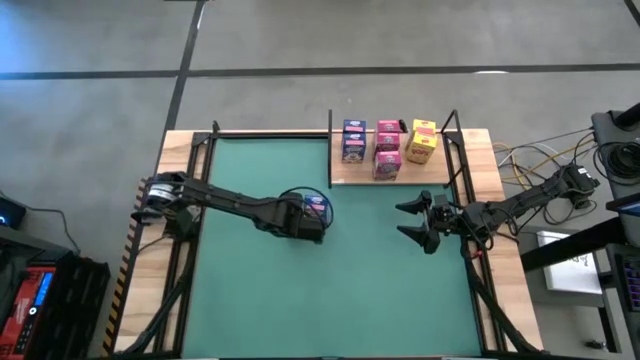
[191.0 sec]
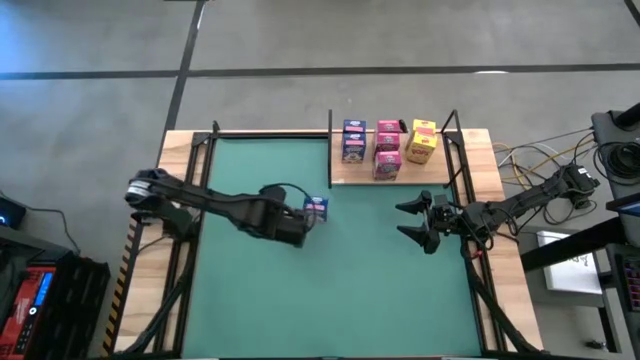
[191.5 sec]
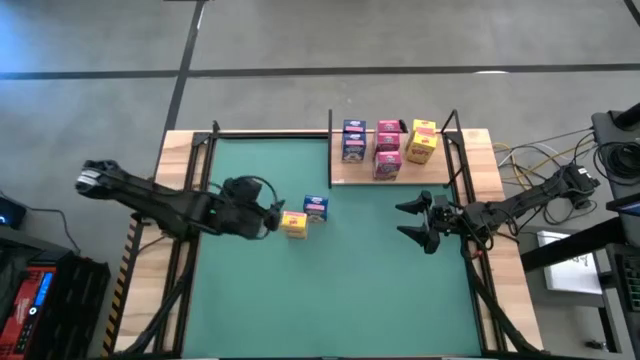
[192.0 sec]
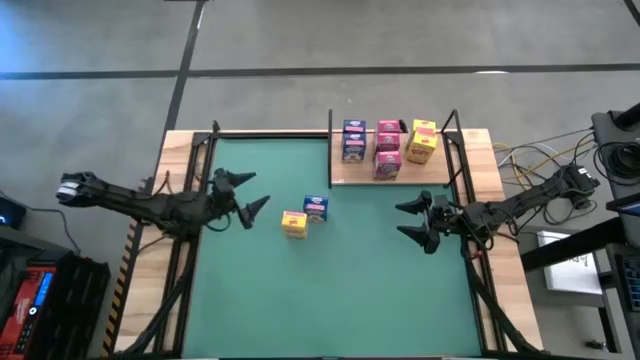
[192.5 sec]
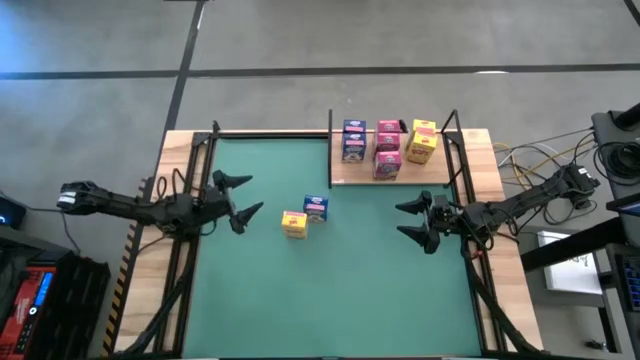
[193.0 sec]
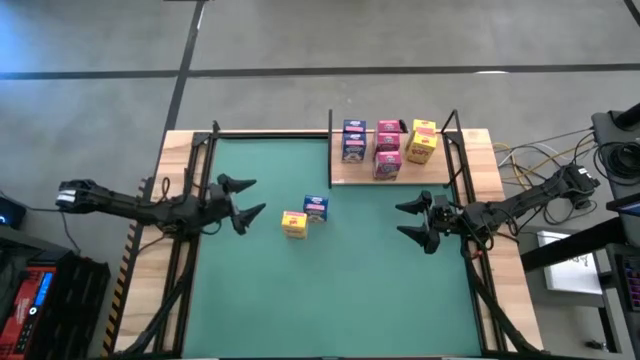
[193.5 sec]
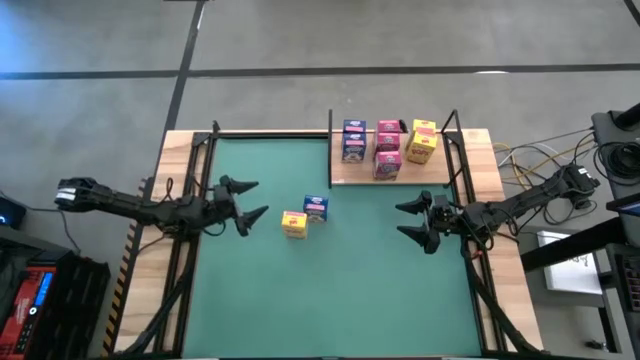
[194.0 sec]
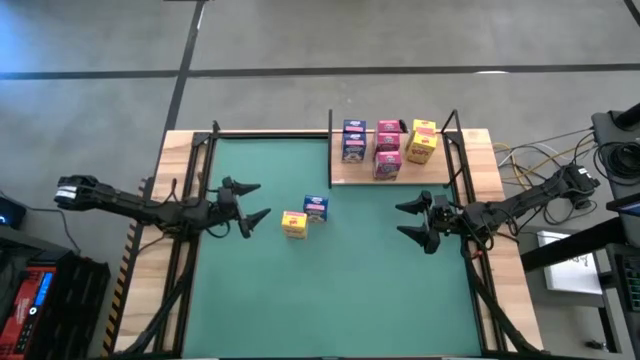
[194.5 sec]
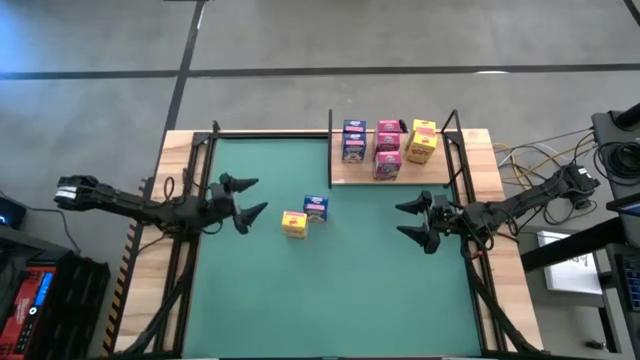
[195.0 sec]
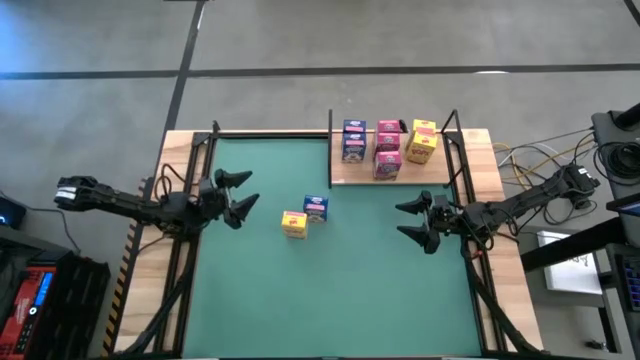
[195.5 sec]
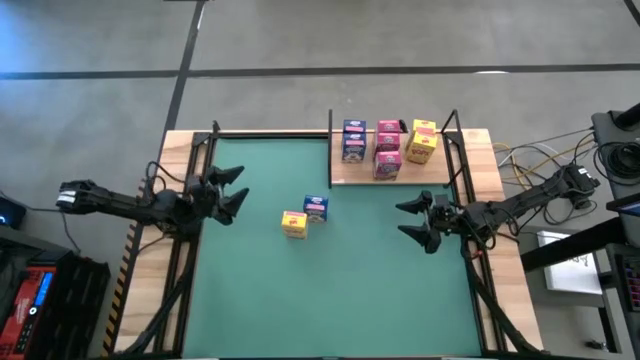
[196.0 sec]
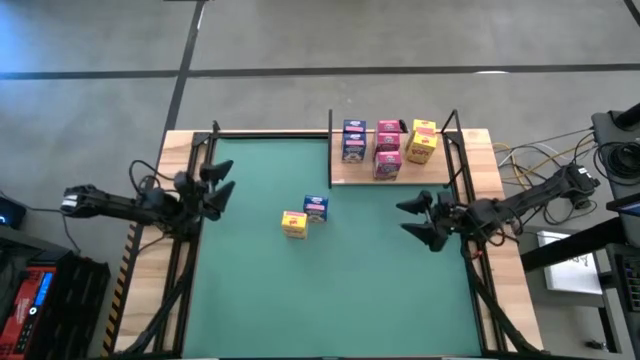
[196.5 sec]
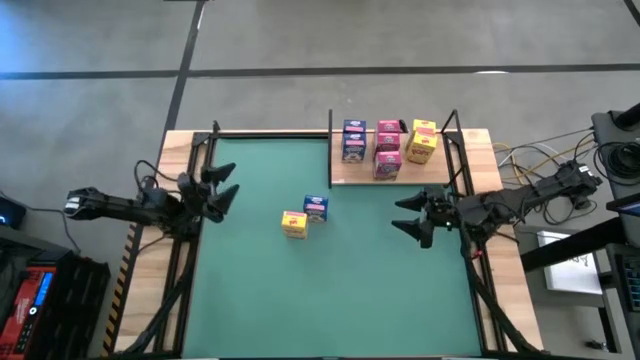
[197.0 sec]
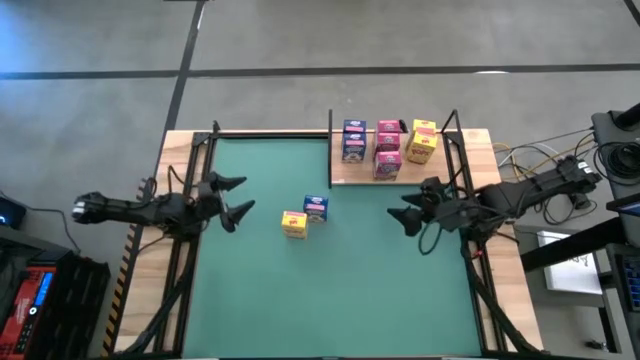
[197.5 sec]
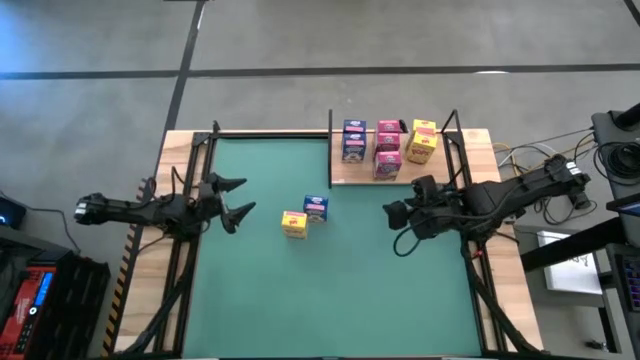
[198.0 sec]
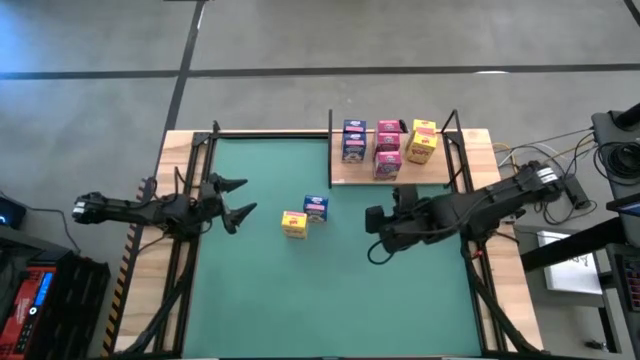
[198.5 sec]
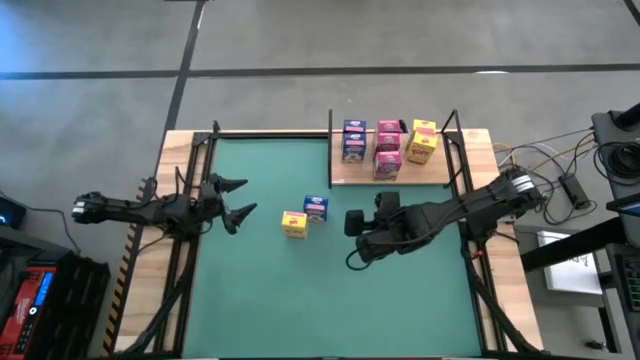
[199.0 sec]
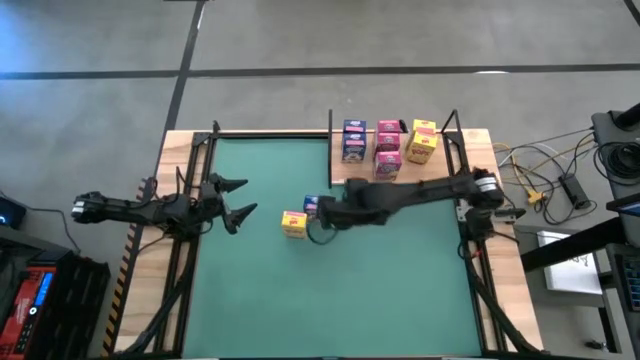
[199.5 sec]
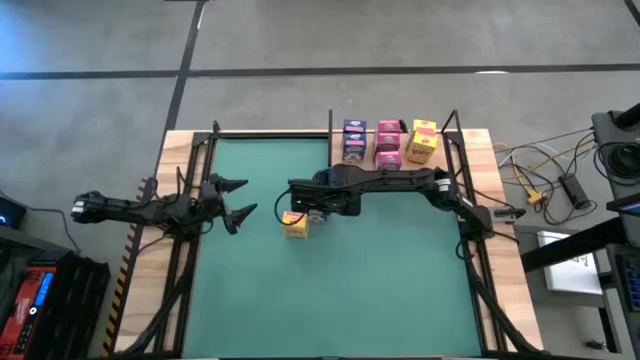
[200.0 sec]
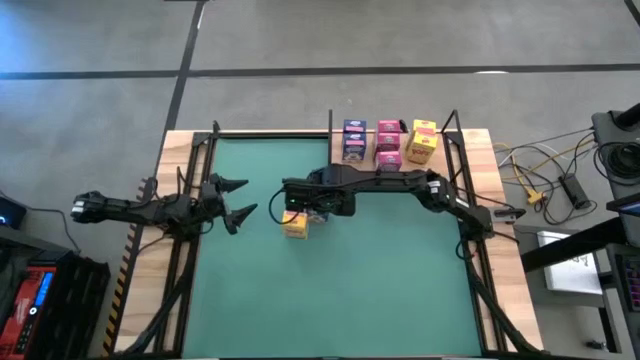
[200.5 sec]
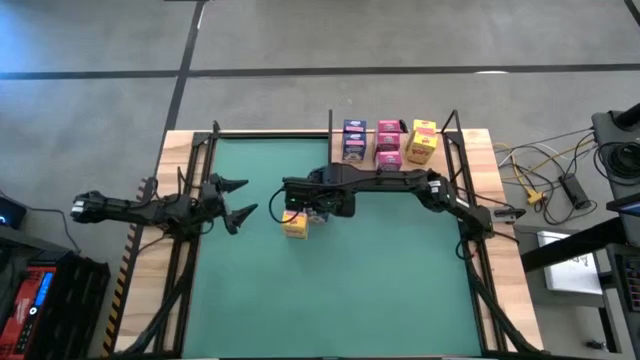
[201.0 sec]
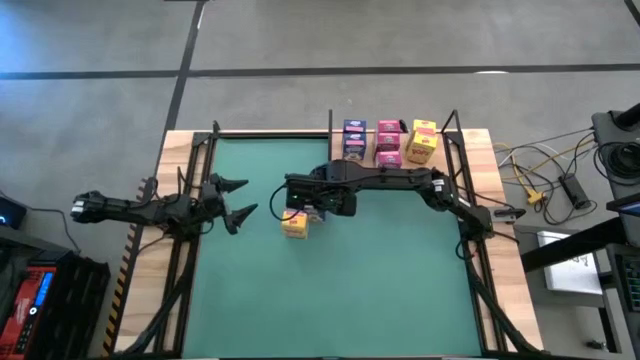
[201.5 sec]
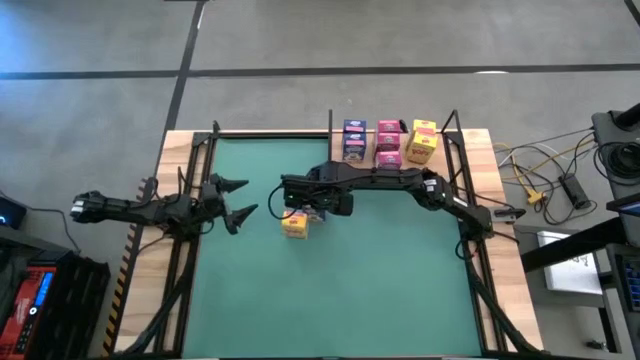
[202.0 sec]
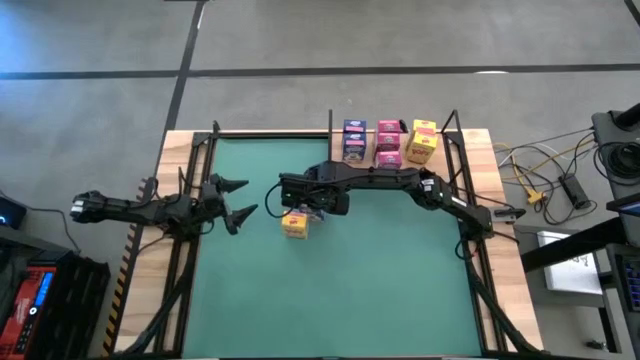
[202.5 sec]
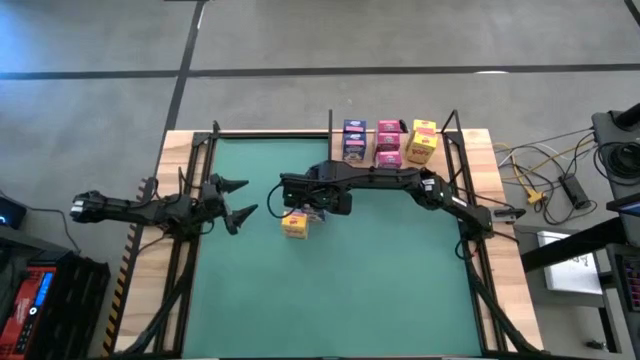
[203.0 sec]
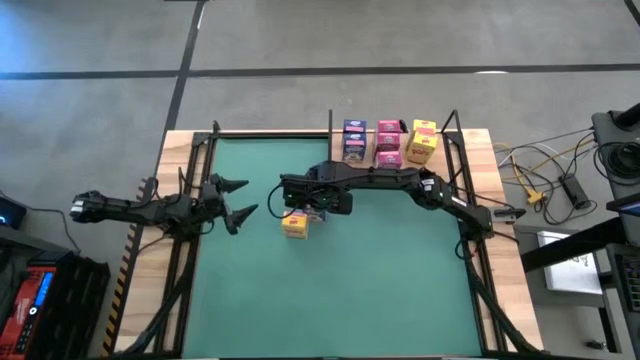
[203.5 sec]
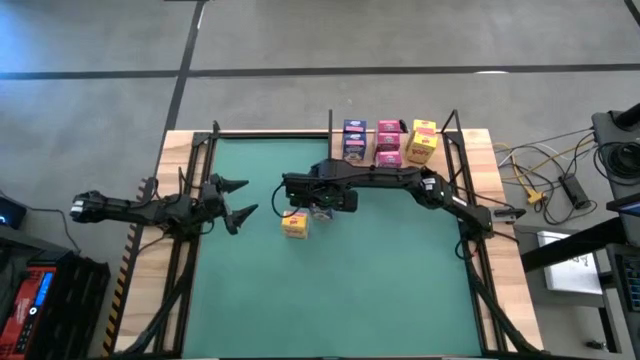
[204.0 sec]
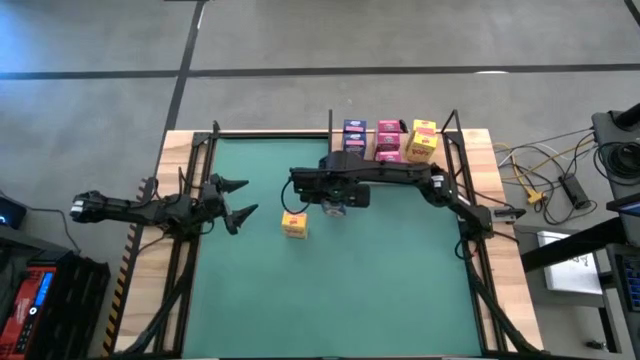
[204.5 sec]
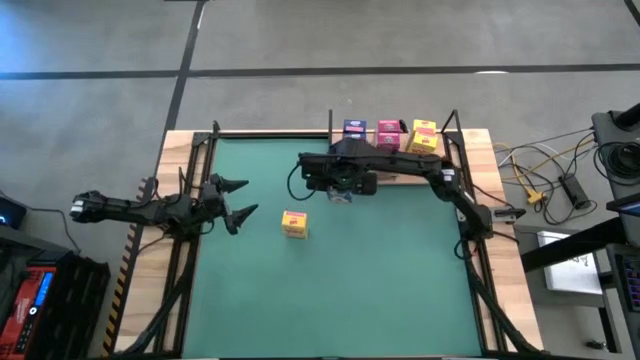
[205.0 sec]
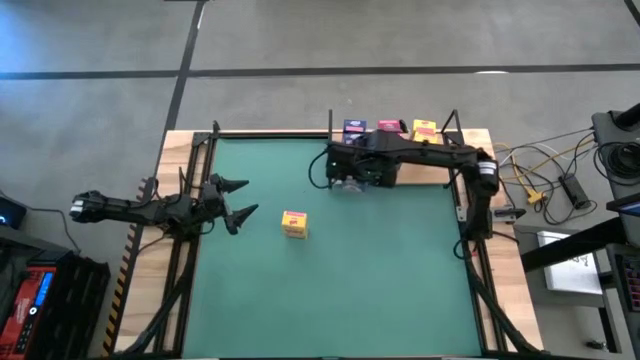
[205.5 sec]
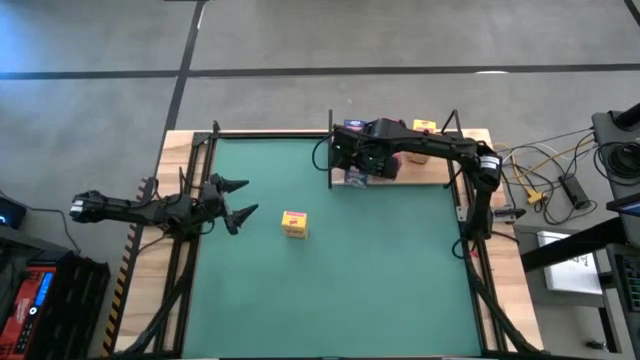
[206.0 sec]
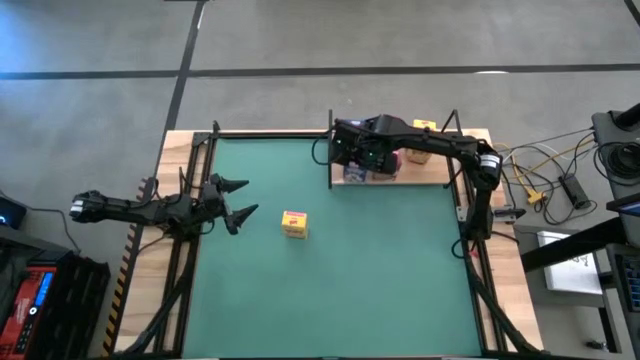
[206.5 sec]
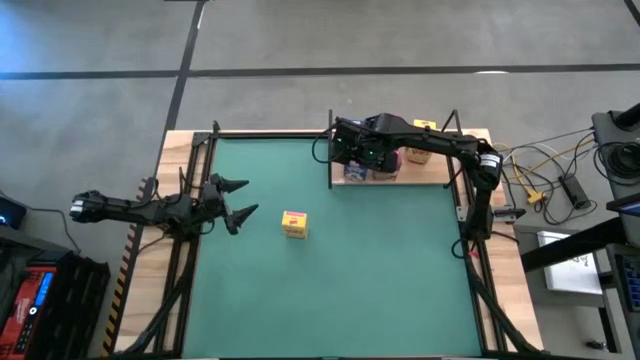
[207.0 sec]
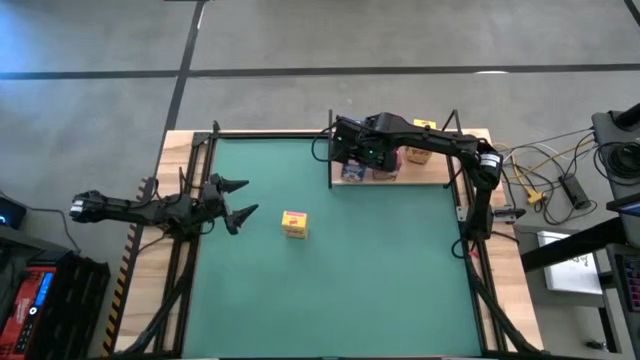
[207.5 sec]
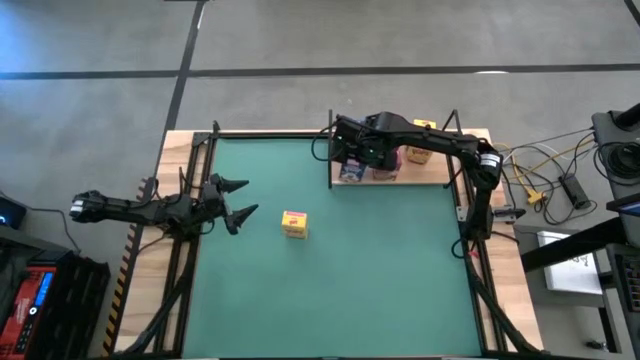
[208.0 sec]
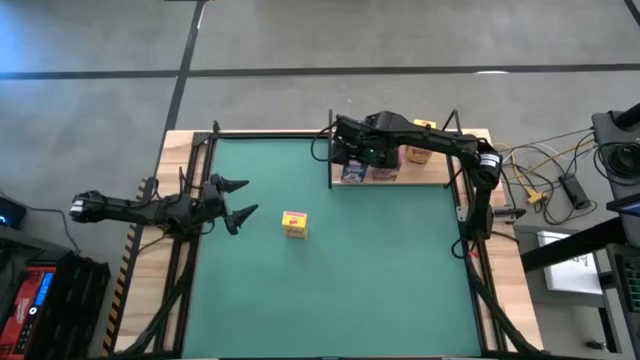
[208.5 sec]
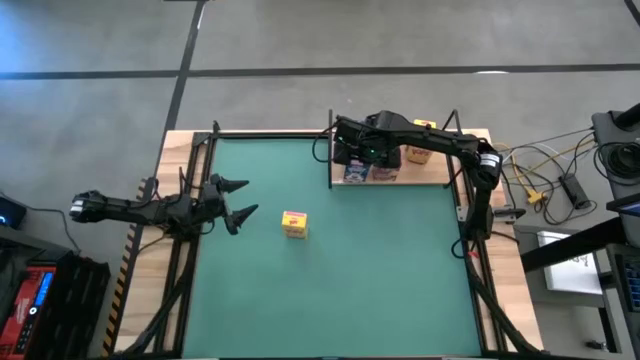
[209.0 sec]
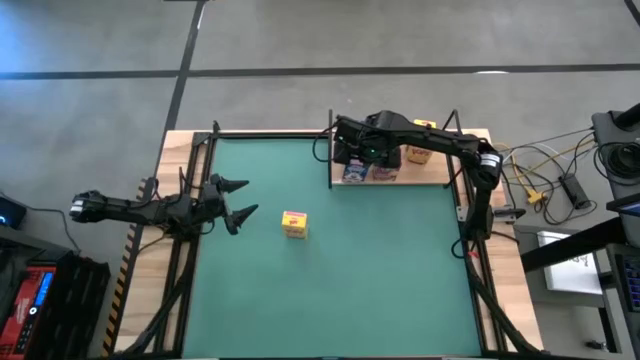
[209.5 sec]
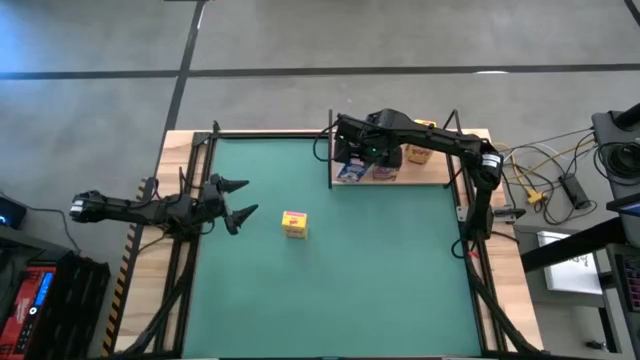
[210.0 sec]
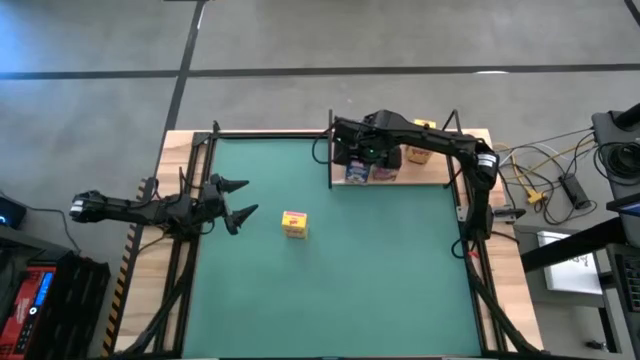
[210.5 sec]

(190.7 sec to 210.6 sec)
Task: Stack cereal on shelf
Put the blue cereal box onto the shelf

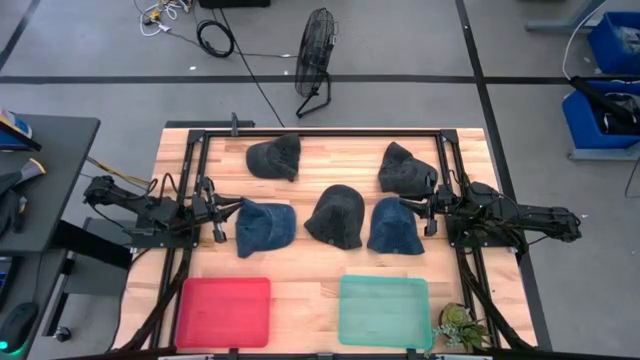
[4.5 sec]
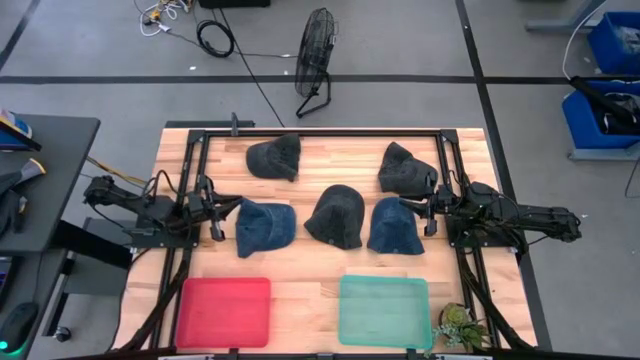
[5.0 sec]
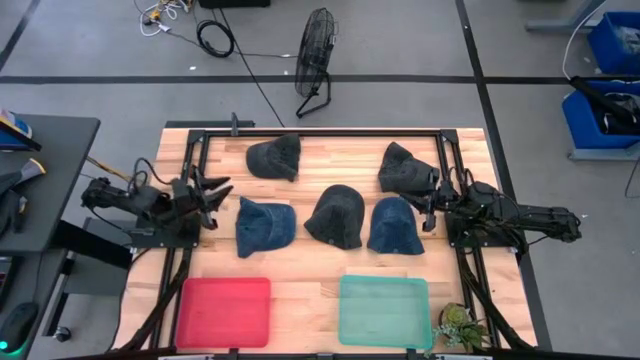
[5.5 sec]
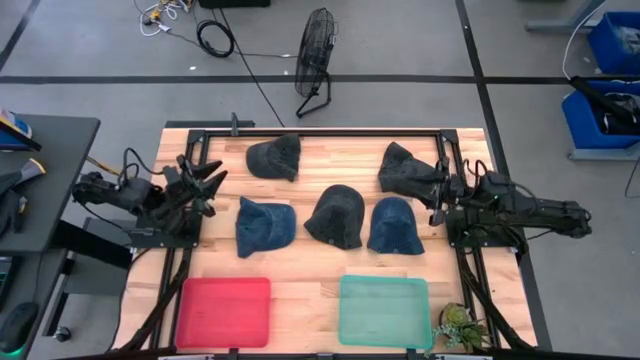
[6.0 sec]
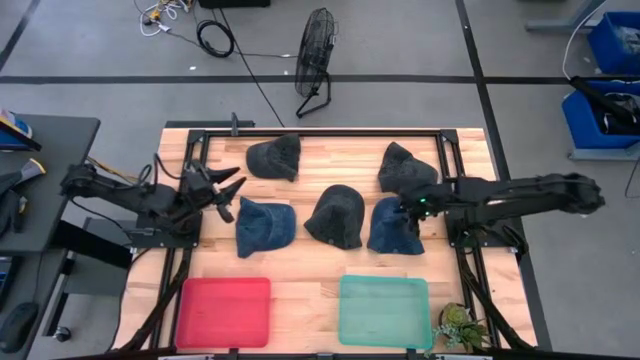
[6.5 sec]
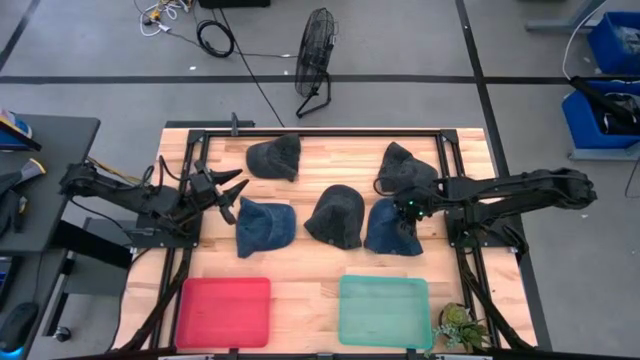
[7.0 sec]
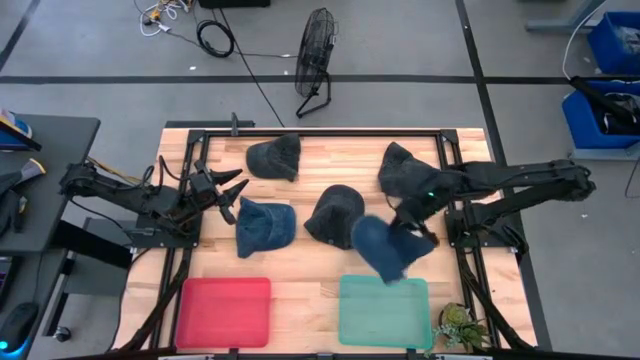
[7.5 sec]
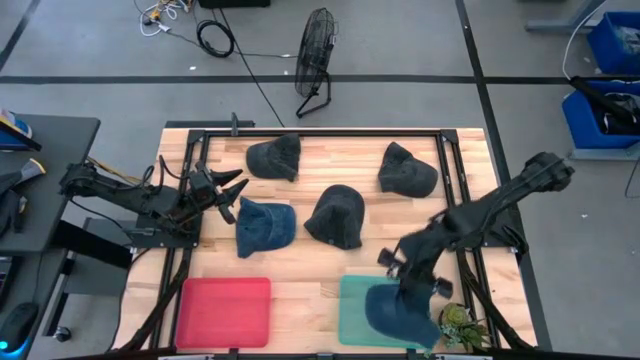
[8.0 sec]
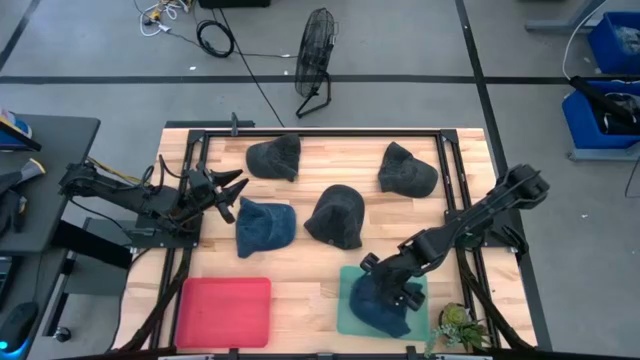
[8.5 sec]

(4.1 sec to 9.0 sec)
Task: Pick & Place hat
Put the dark blue cap into the green bin
